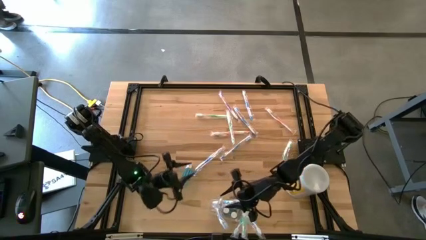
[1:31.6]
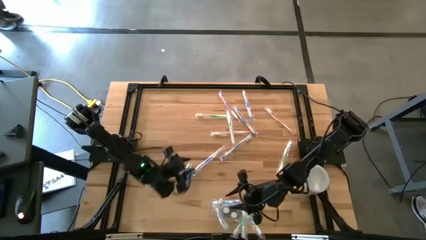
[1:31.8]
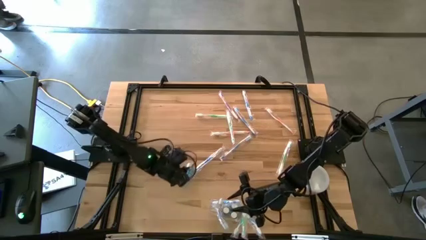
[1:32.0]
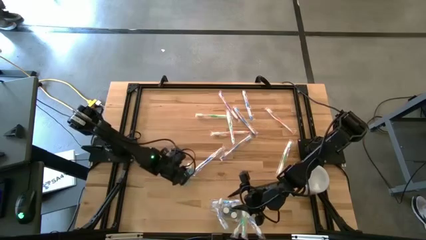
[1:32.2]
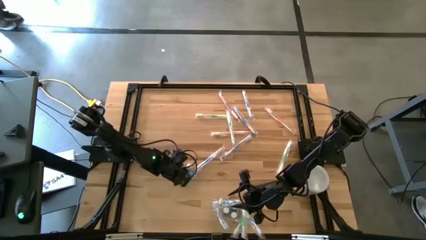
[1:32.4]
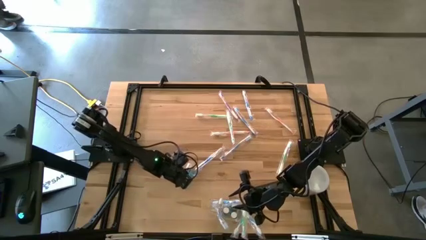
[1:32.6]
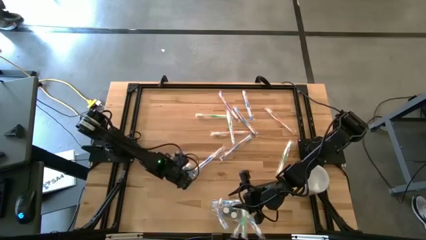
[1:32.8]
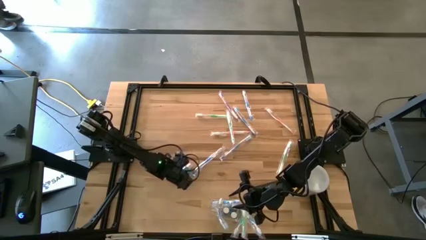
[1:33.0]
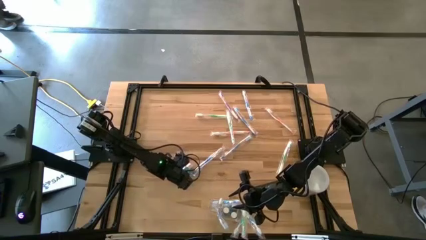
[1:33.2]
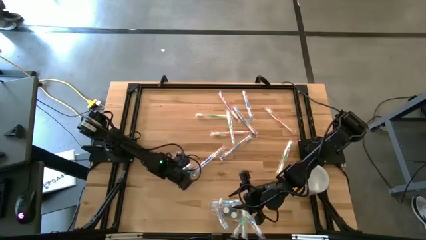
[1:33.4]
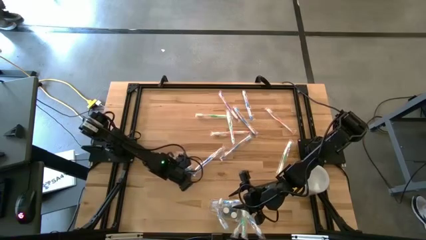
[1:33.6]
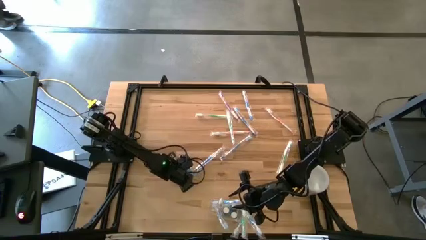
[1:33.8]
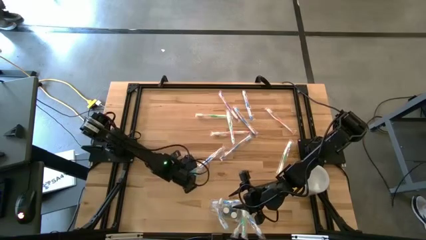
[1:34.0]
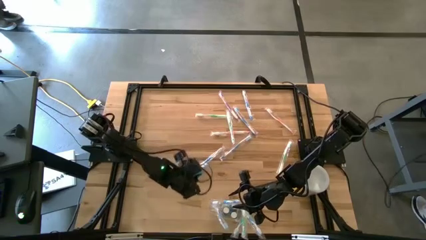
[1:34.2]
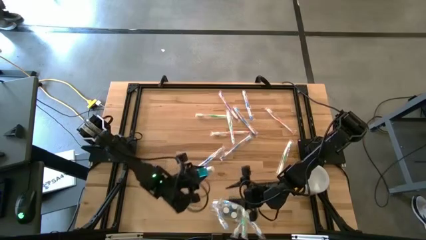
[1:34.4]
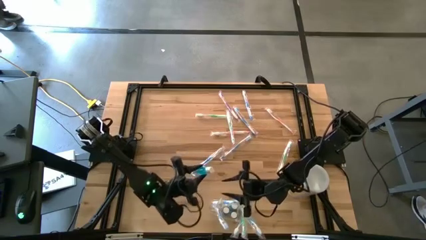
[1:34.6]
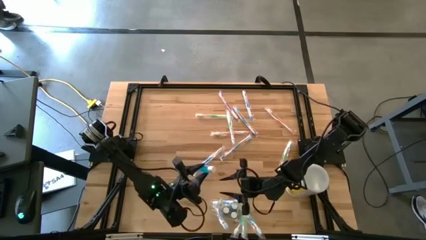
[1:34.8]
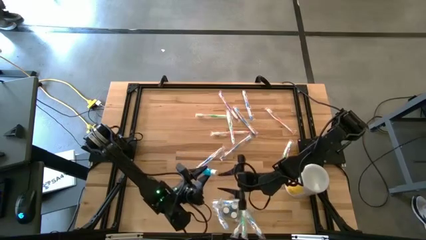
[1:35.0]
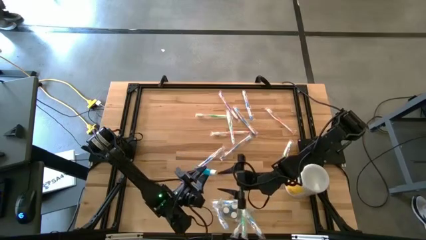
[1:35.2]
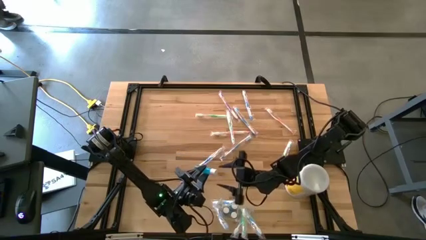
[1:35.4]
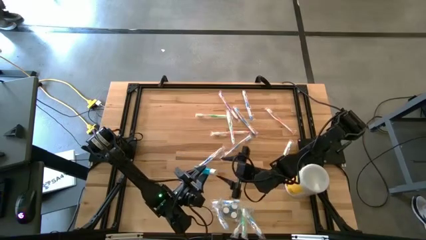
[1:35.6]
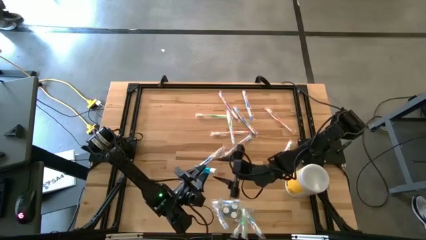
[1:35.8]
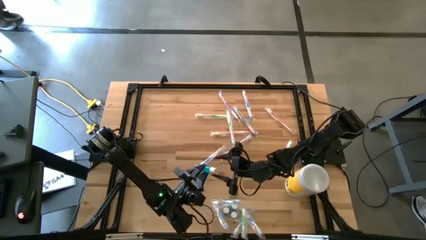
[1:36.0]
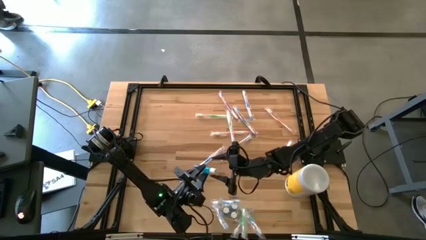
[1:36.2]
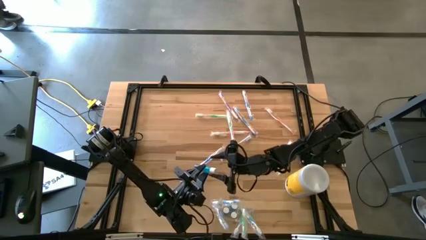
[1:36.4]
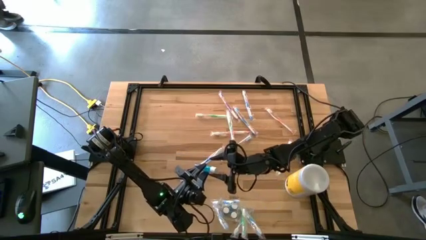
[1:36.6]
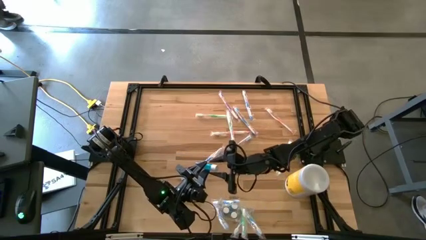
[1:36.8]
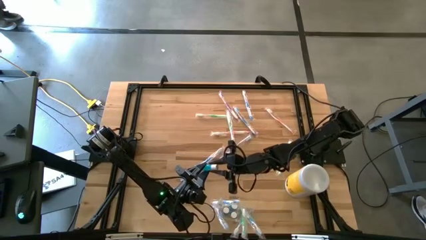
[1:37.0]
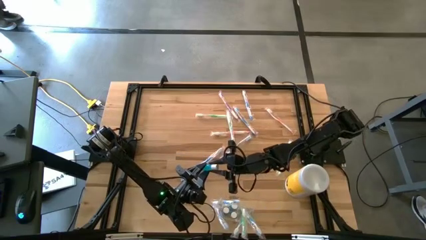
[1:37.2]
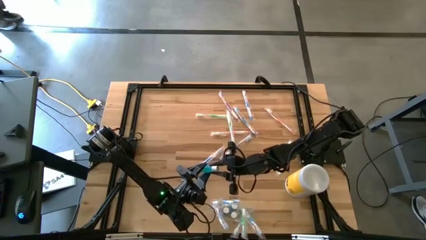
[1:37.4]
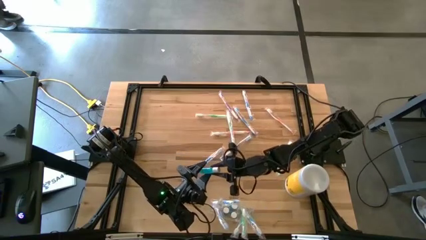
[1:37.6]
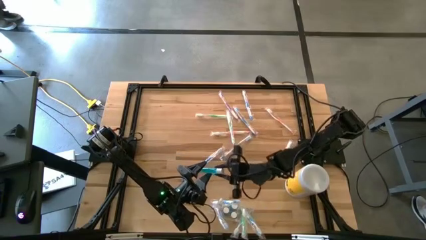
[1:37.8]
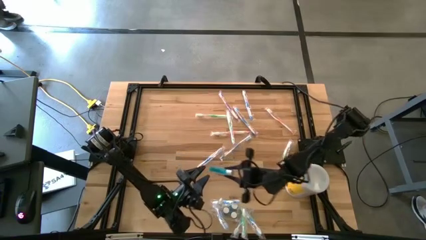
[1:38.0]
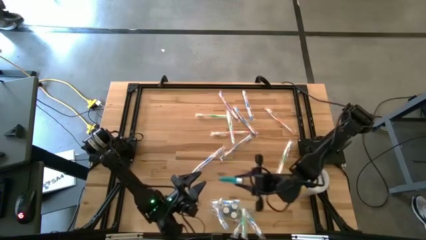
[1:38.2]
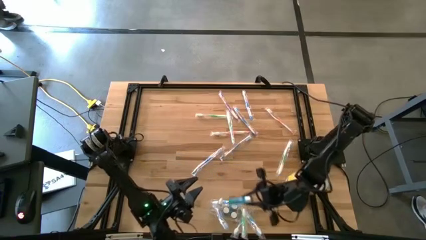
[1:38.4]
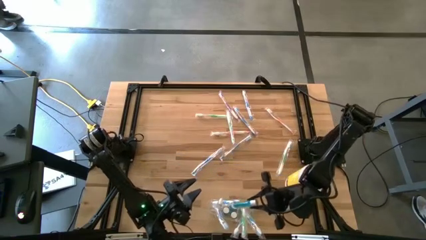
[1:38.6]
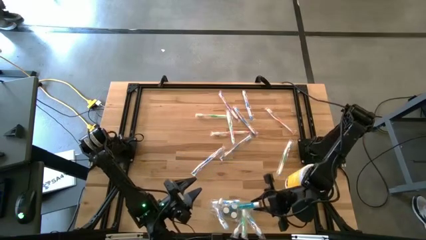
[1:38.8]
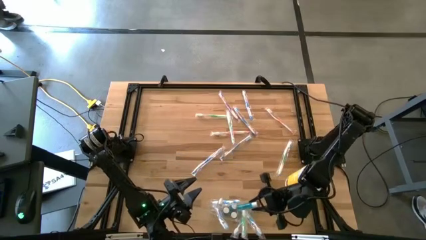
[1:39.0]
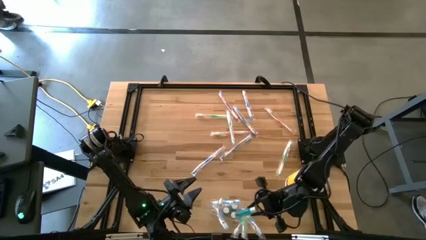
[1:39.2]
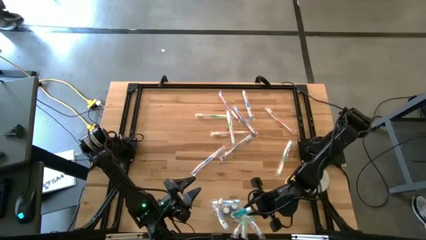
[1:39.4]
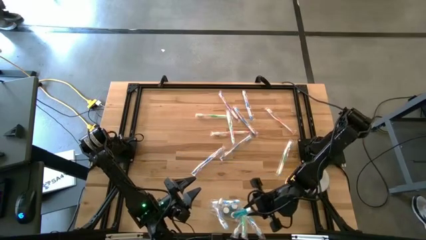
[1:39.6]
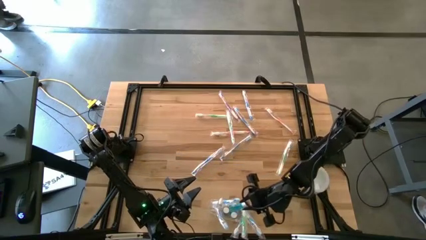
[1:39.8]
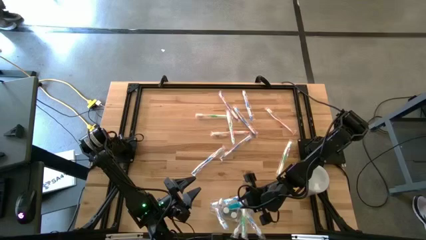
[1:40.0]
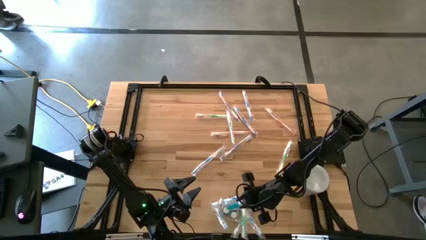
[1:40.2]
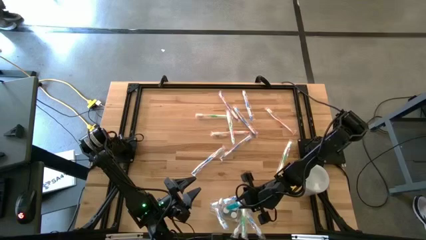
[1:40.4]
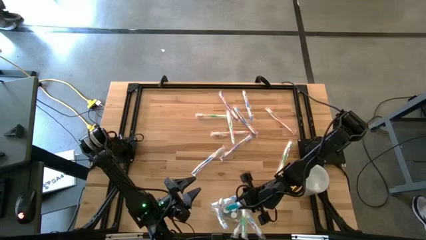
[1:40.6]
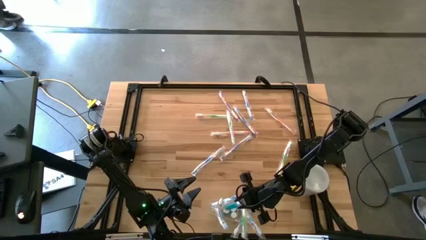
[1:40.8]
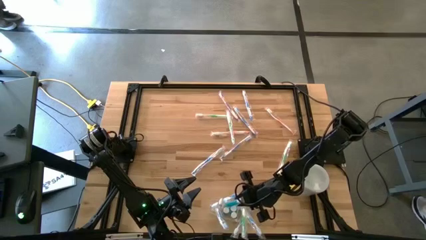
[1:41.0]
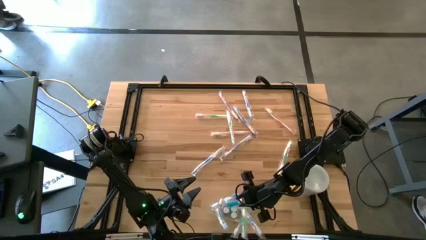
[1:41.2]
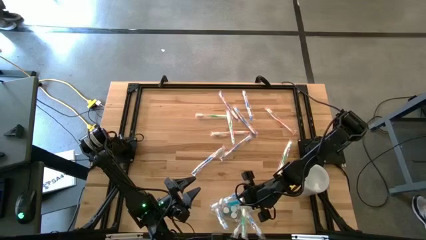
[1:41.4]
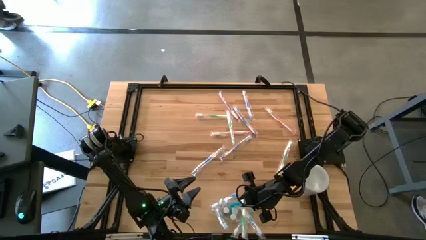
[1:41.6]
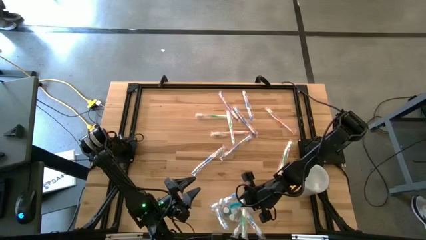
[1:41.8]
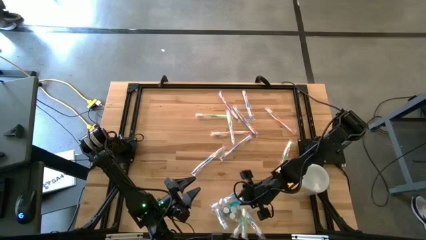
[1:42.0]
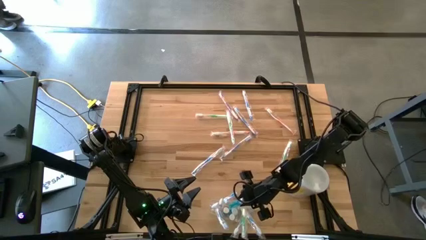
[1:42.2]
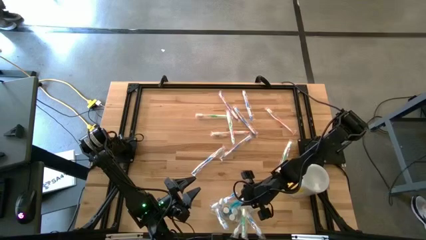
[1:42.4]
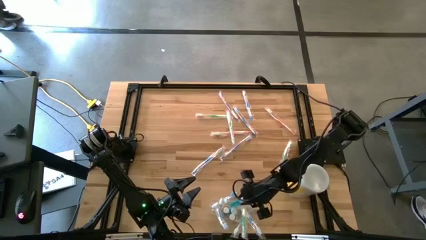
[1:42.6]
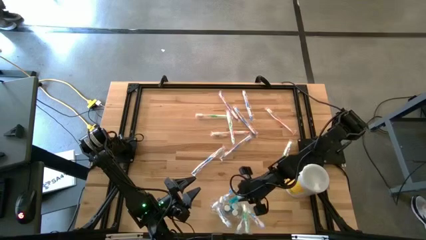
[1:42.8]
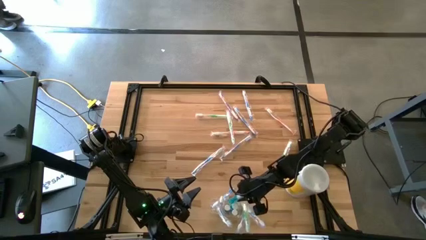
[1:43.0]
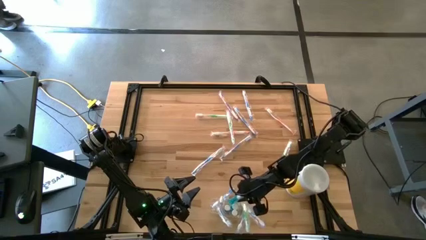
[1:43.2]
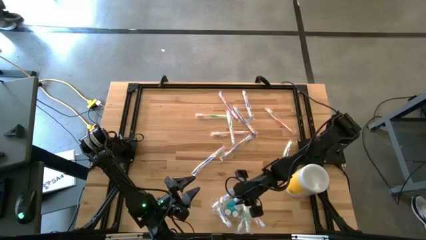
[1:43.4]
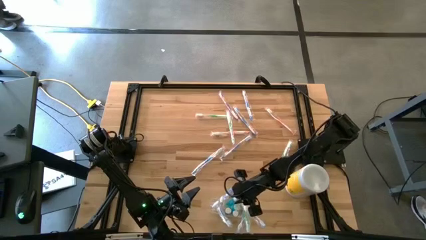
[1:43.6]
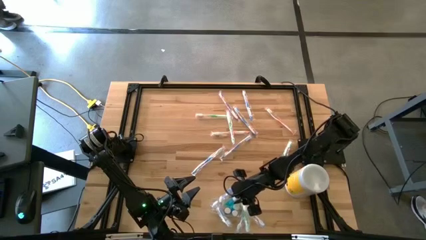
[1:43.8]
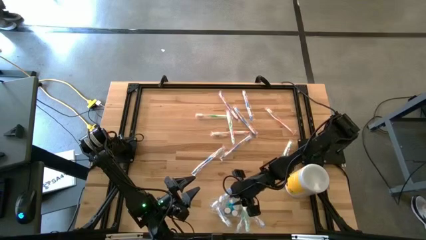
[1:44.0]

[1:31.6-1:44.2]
Task: Pick & Place toothbrushing station
Put the mouthwash into the transparent organizer

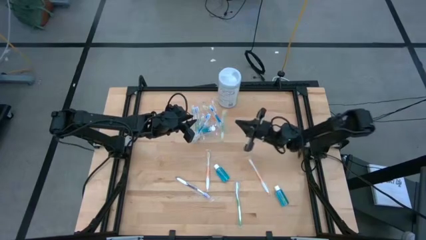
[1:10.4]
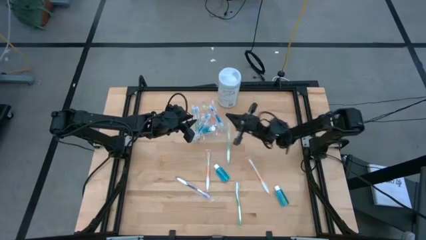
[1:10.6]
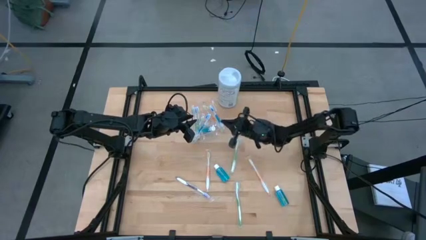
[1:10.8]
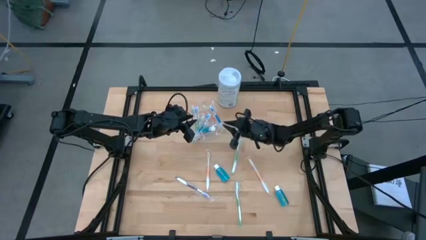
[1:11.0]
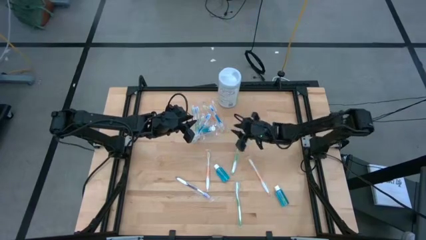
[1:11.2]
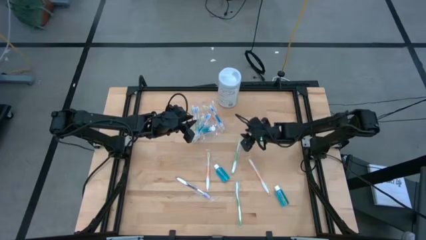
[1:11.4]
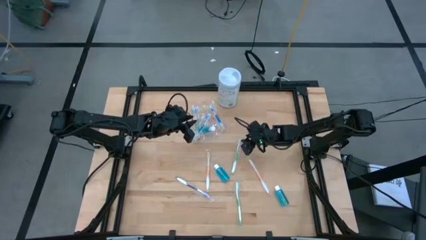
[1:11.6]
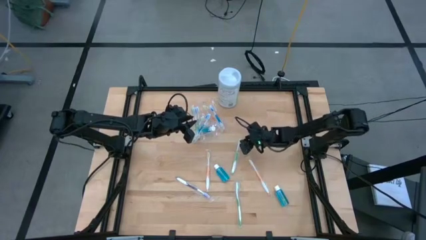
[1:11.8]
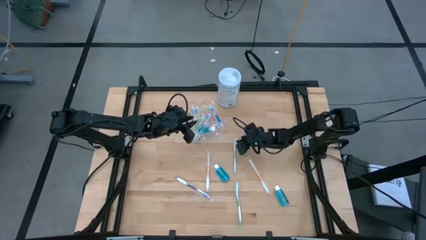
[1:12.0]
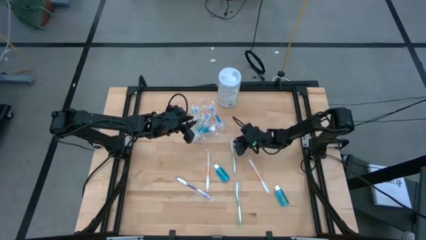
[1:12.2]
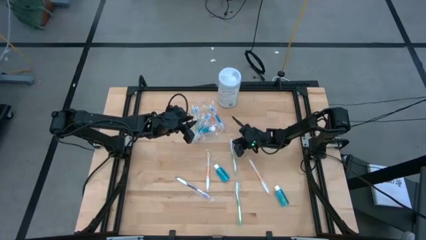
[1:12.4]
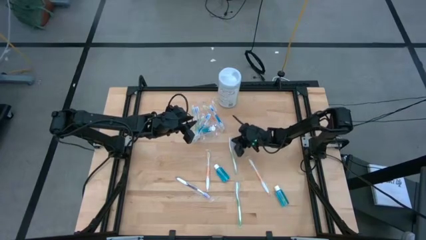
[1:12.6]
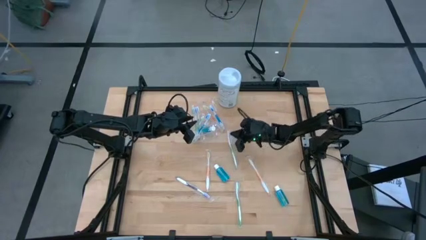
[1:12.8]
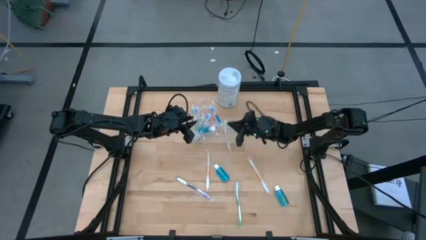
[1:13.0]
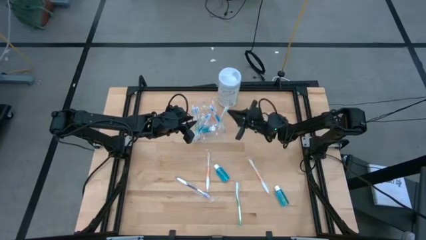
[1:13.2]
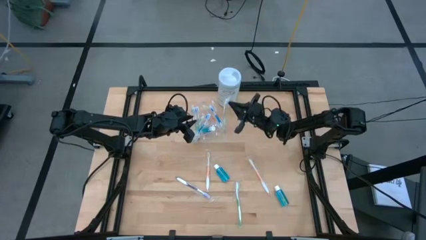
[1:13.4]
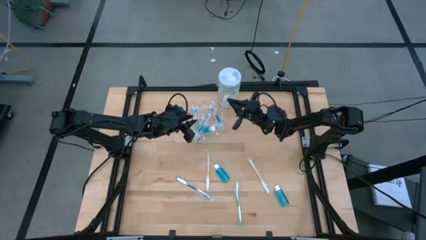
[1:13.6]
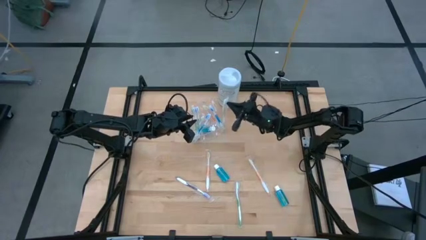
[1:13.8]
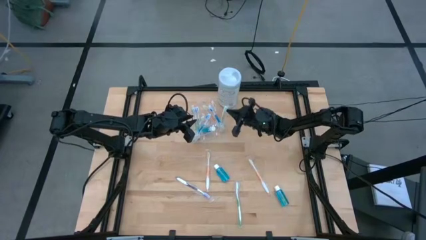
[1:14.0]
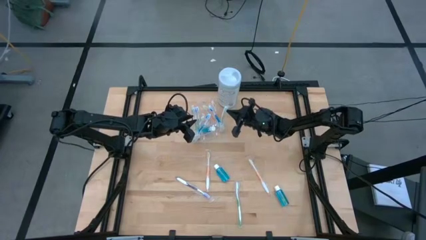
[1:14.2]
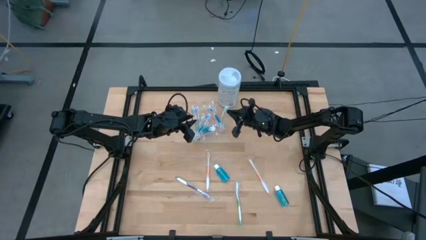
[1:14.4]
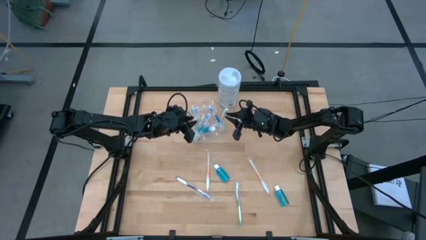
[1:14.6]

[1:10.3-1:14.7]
Task: Pick & Place toothbrushing station
Put the green toothbrush into the transparent organizer

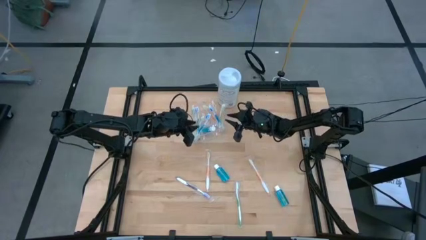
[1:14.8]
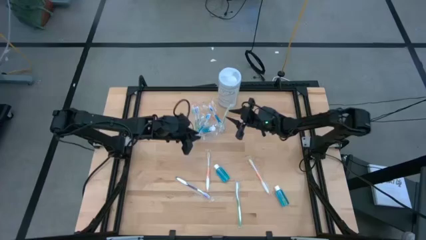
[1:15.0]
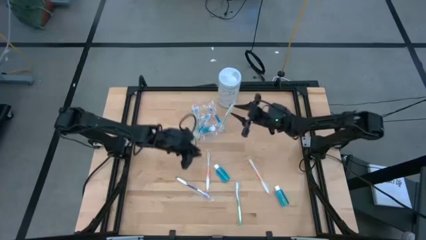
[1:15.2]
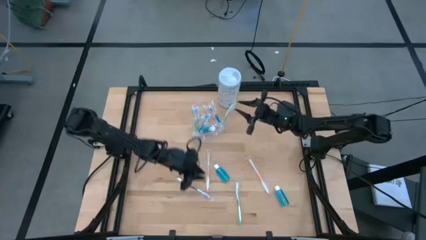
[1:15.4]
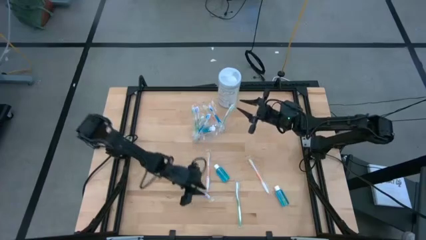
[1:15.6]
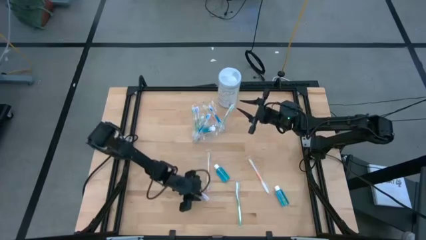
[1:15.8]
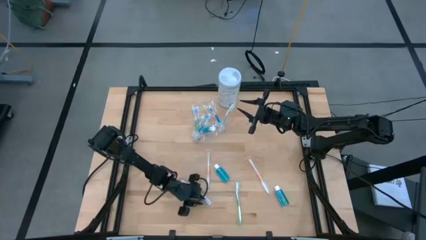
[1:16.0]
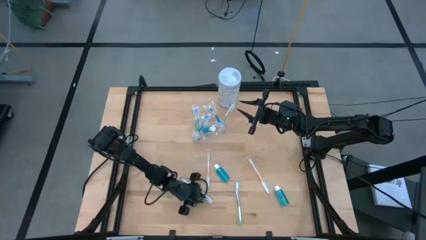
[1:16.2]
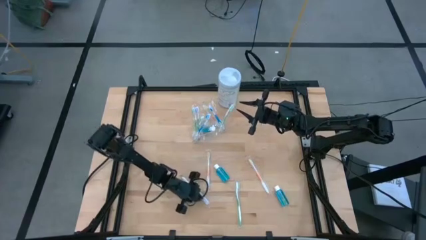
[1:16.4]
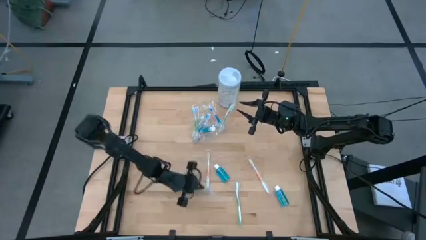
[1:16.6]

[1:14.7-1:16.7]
Put the purple toothbrush into the transparent organizer
